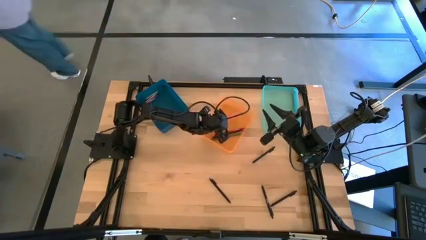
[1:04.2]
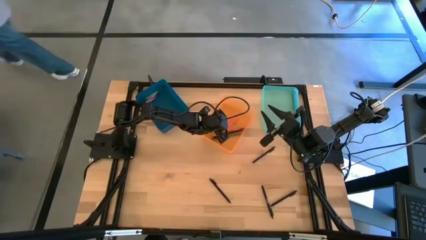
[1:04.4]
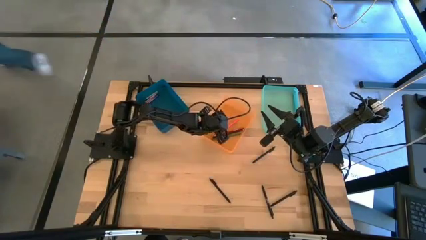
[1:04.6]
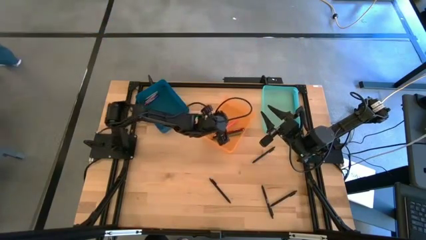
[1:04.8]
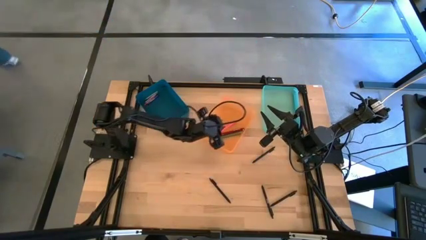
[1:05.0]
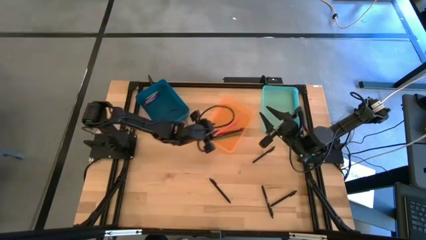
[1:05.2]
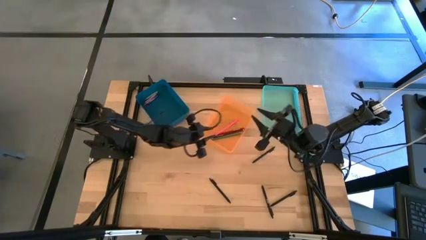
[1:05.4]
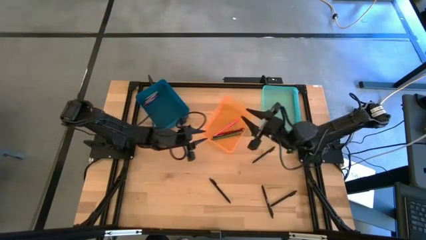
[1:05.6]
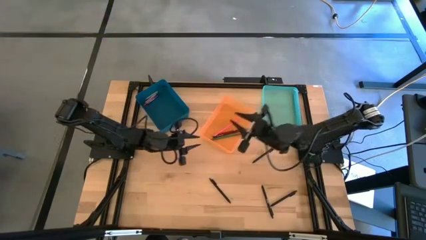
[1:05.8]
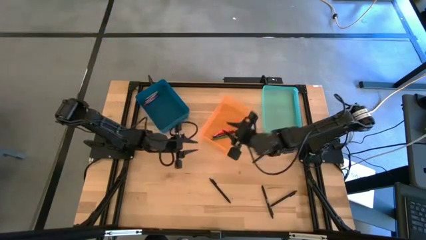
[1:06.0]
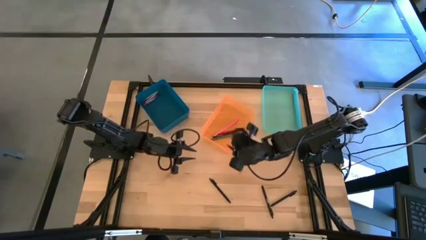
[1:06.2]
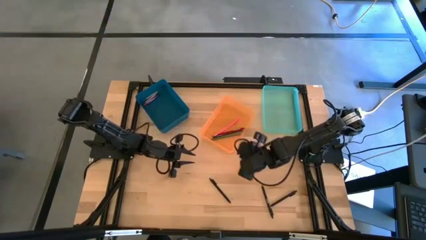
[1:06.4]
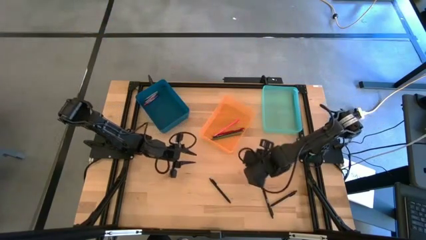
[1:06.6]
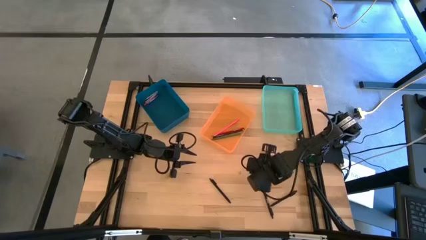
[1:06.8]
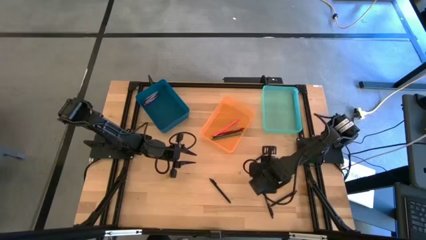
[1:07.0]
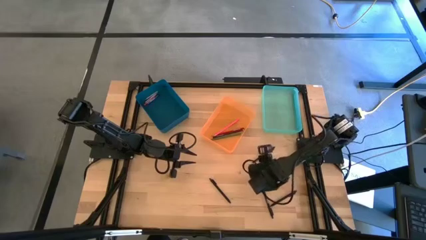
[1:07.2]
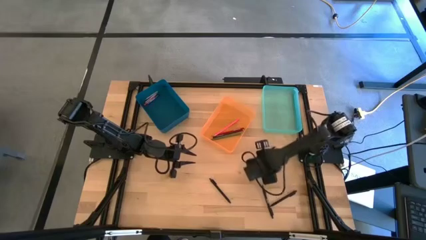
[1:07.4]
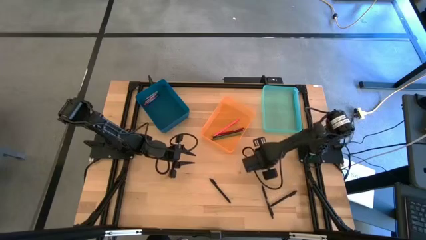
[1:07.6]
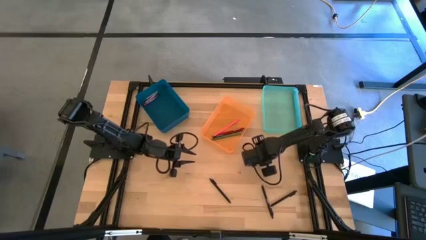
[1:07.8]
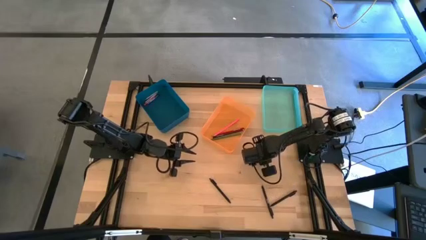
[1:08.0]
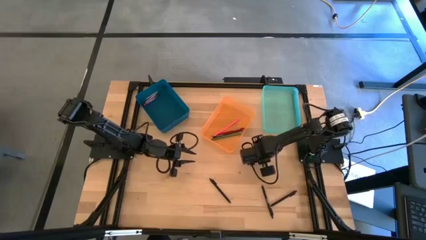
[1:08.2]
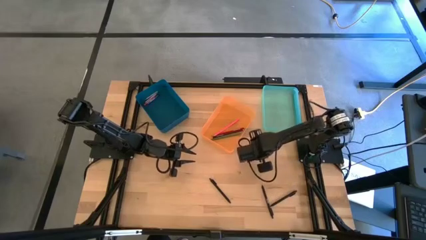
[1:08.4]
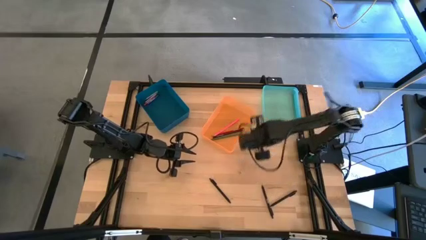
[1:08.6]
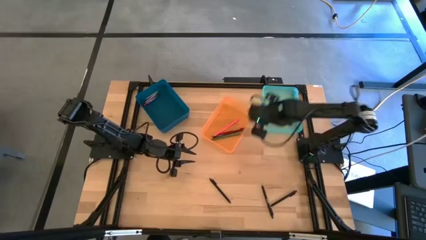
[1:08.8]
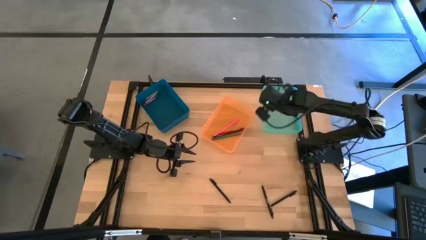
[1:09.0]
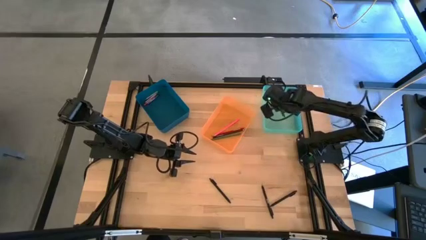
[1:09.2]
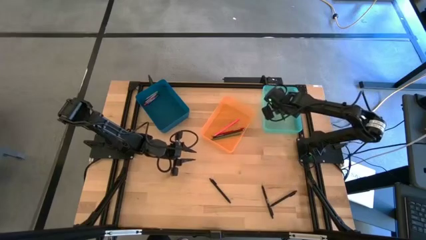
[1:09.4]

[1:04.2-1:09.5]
Task: Sort crayons/erasers/pens/pencils in bins
Put the black pen into the light blue bin

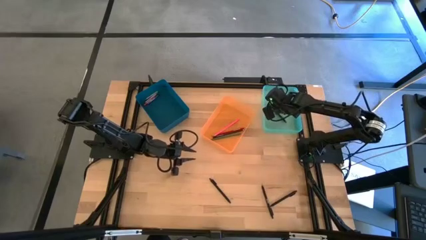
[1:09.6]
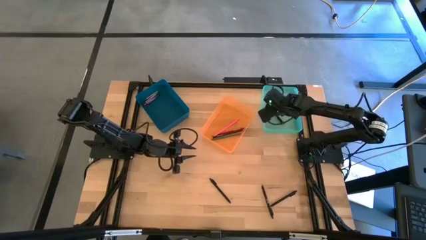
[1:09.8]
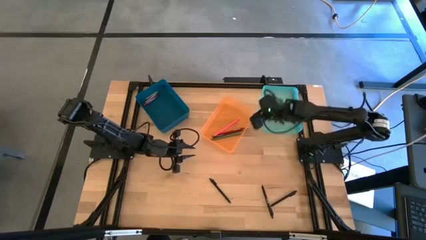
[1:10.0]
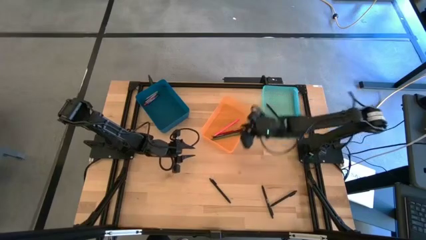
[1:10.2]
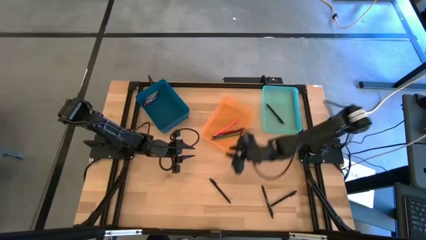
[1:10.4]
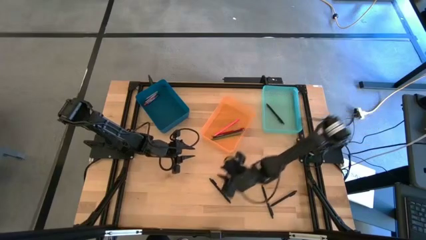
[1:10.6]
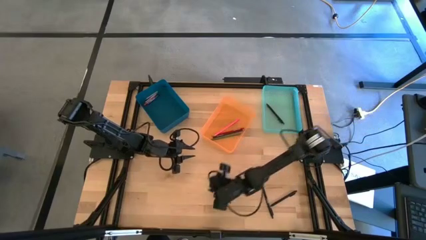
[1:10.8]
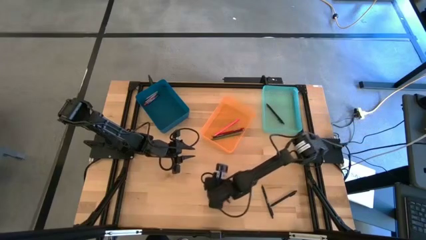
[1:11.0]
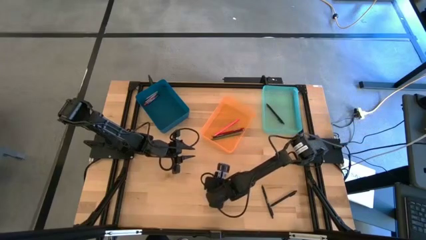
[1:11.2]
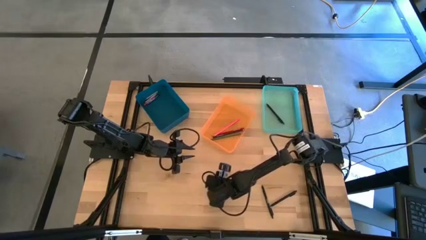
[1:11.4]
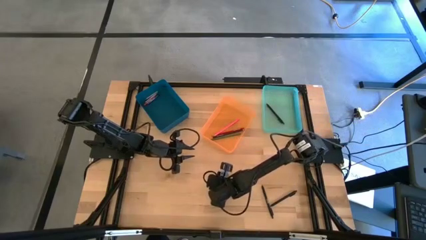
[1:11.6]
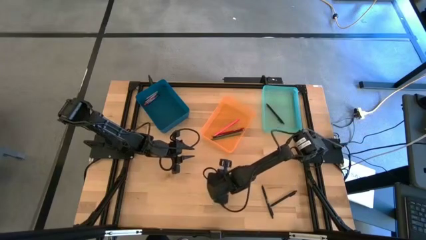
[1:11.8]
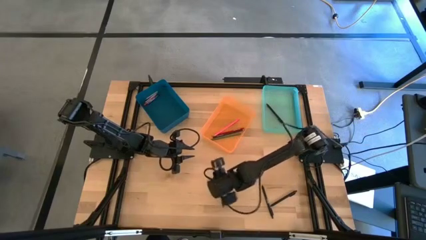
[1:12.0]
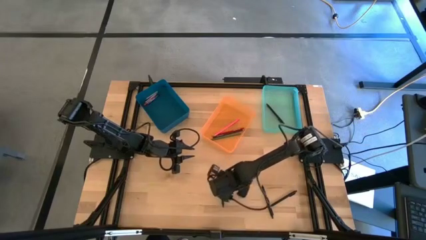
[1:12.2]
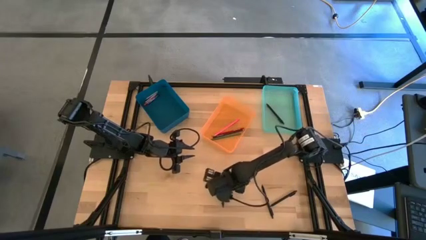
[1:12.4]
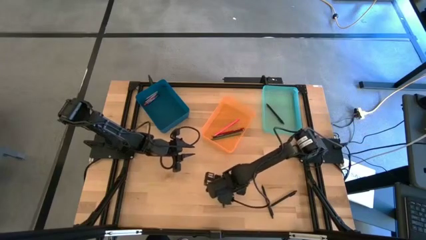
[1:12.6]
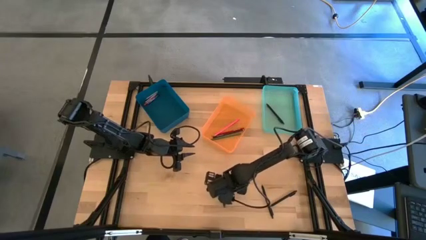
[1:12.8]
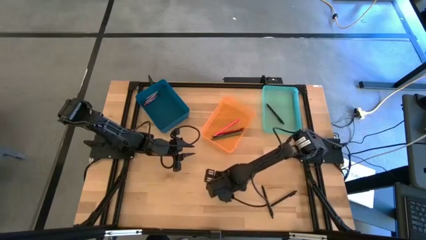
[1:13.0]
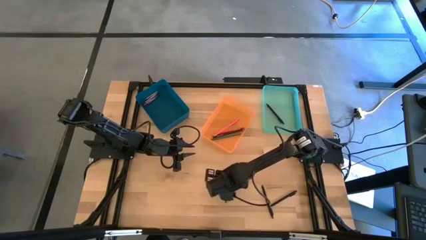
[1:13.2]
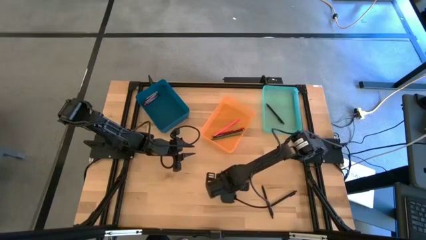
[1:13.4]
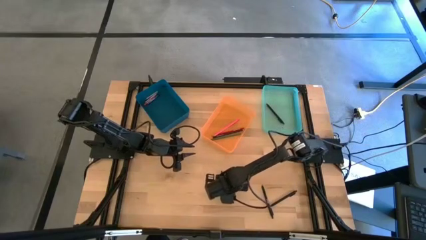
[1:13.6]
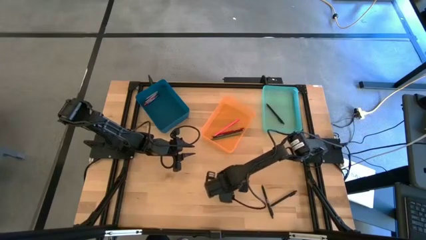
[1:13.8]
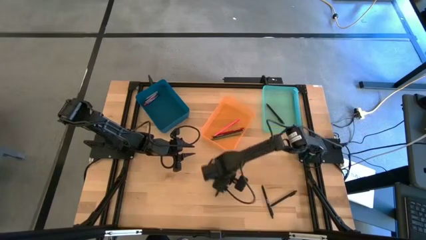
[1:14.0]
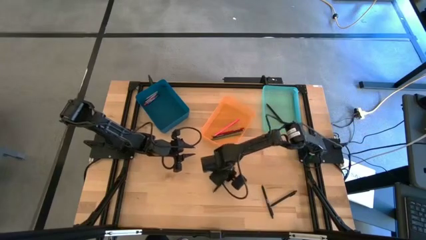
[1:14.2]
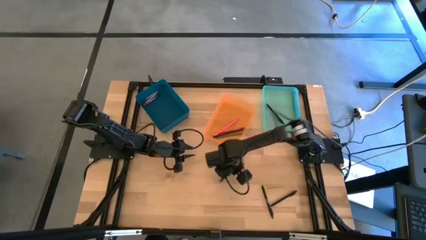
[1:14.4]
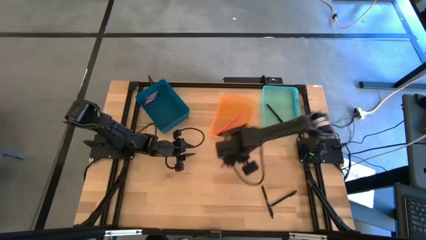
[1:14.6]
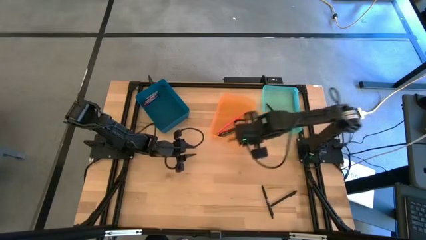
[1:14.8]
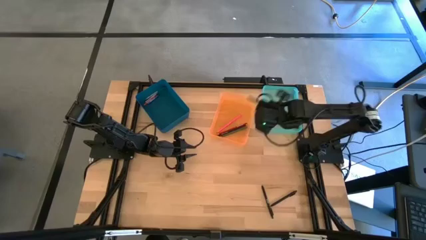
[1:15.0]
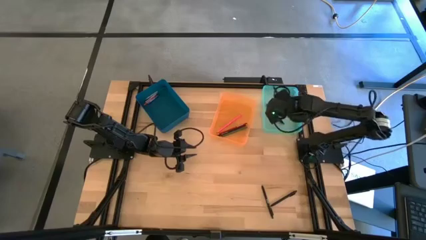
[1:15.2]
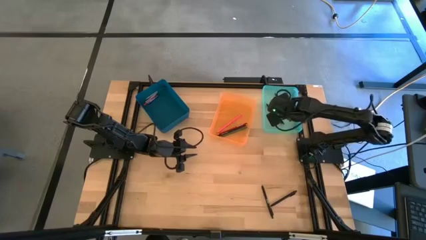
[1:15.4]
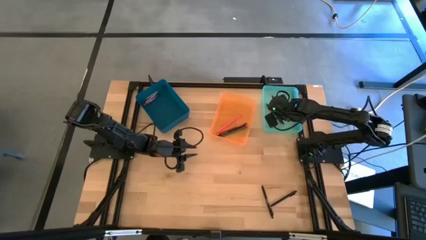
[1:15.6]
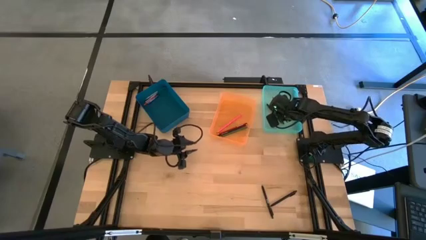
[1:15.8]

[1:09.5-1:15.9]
Put the black pen into the light blue bin

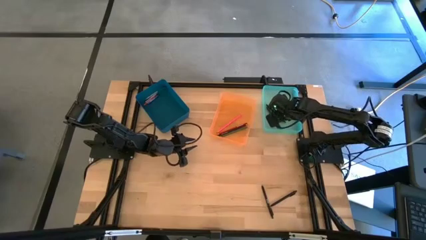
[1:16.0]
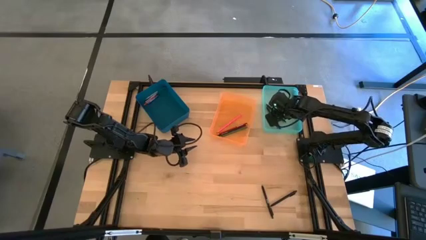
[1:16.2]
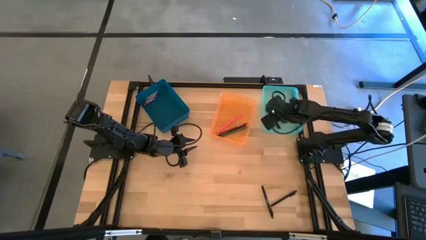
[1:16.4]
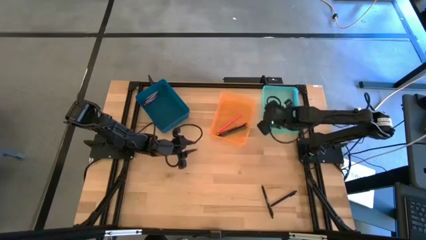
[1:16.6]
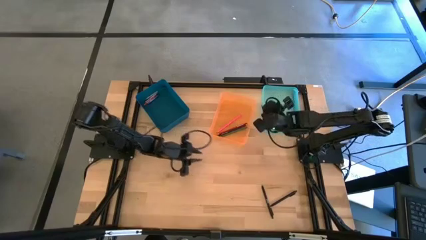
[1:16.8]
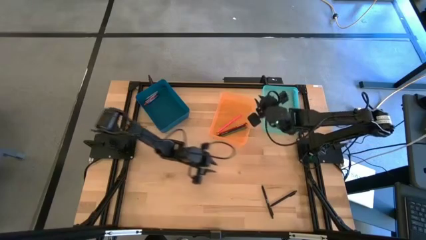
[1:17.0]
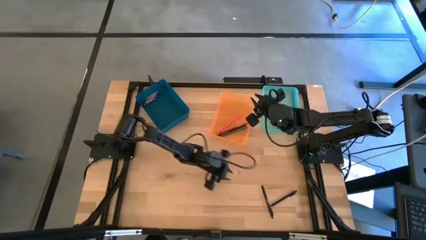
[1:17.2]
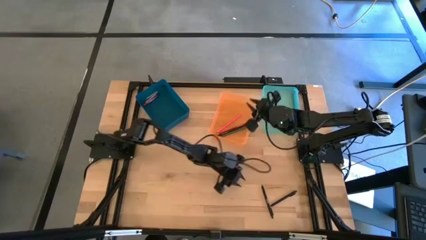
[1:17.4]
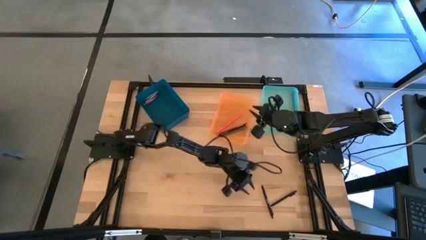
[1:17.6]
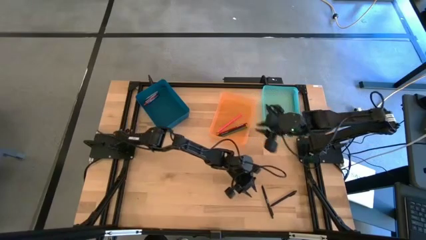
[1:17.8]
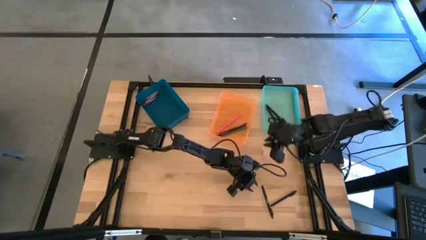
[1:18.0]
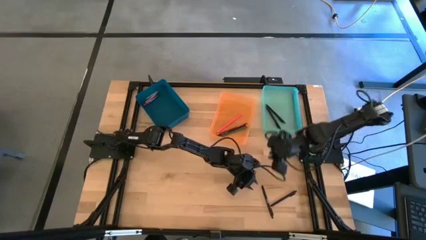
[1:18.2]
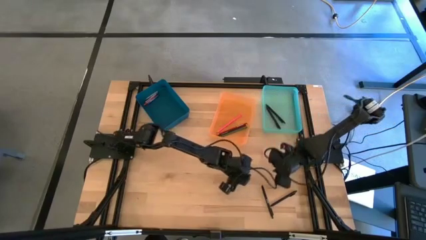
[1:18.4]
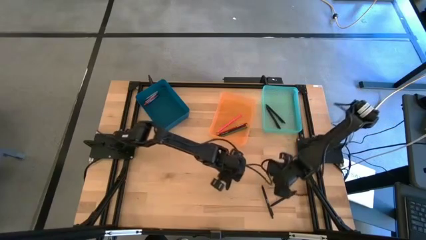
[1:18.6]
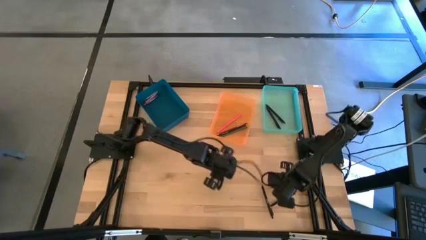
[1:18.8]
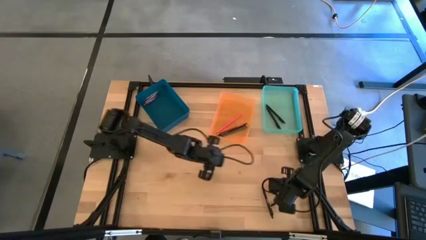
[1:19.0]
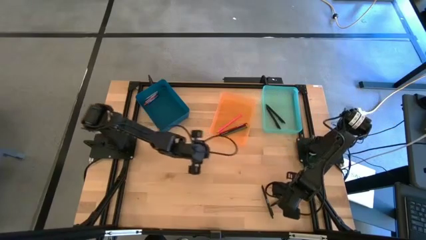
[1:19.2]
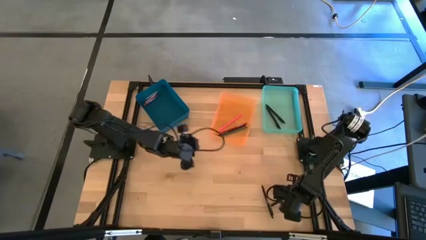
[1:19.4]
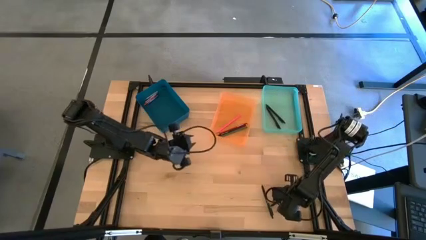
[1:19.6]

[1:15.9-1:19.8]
Put the black pen into the light blue bin

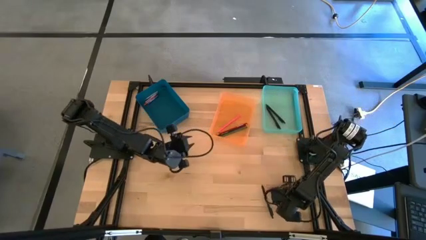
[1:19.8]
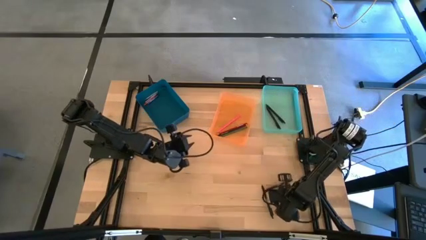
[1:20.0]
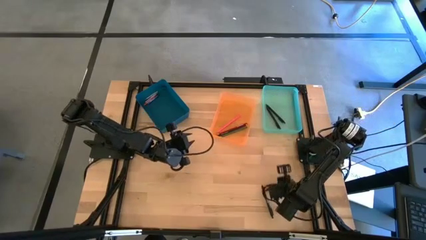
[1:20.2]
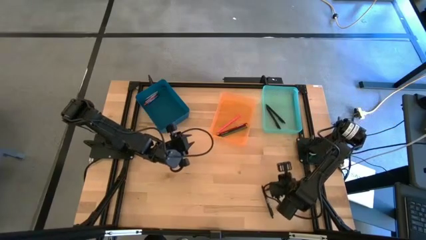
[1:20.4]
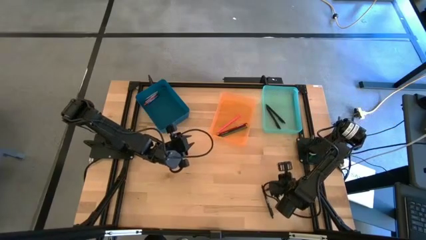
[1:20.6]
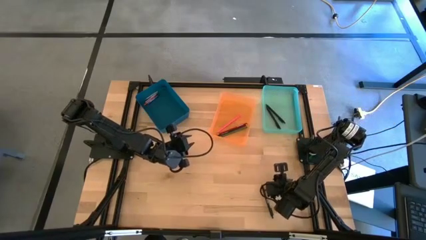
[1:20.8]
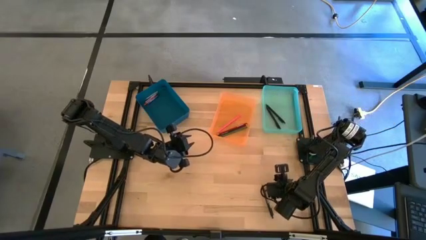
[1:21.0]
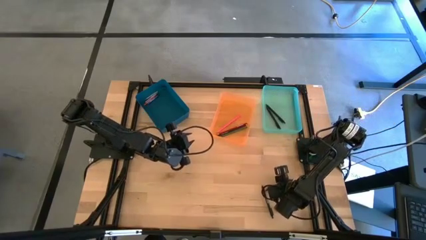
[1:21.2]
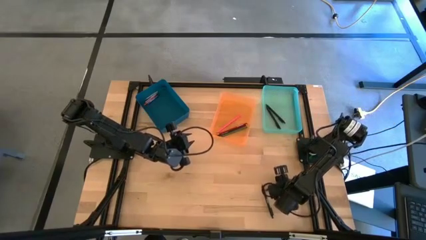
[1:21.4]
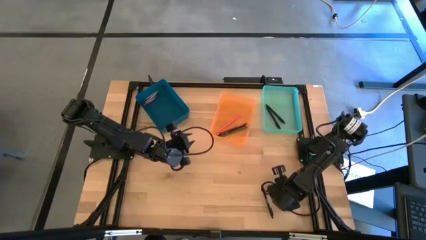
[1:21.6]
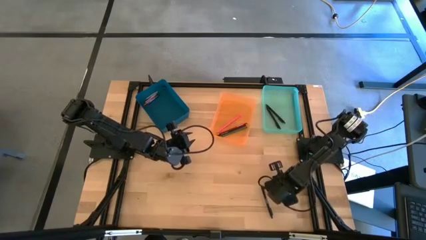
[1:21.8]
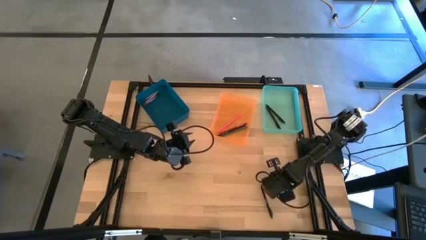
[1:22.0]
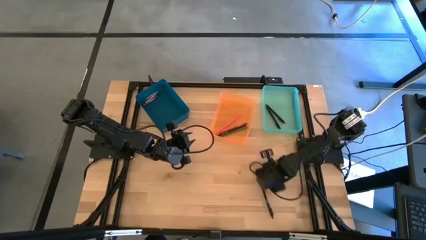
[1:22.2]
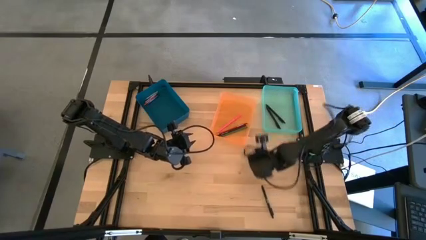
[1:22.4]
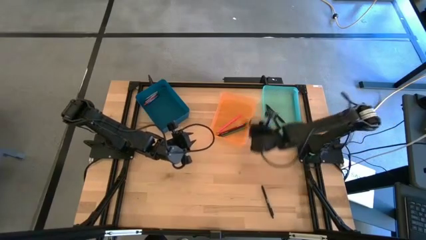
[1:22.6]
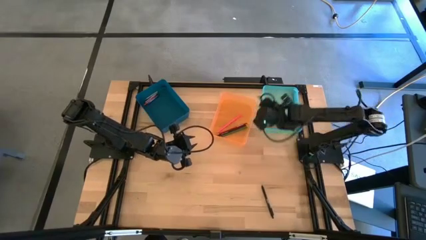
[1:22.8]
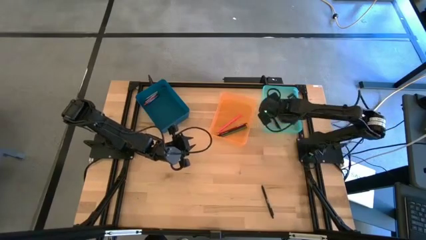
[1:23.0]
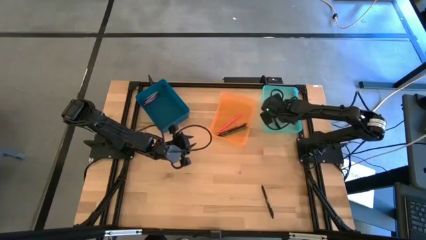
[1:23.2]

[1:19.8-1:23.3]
Put the black pen into the light blue bin
